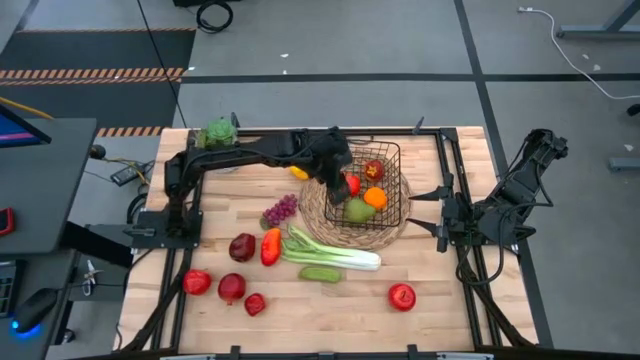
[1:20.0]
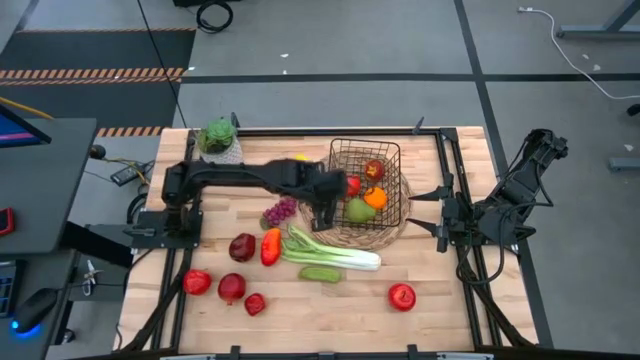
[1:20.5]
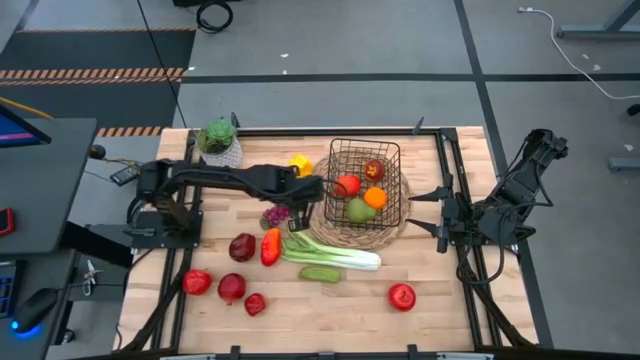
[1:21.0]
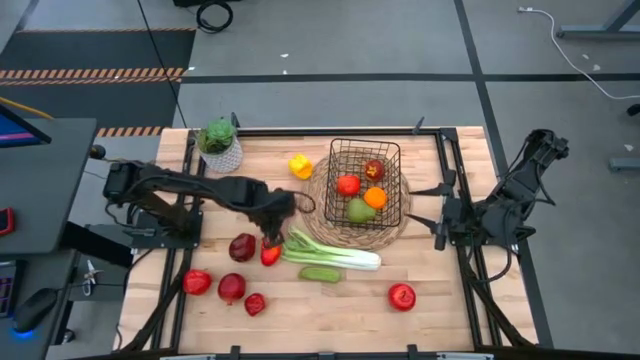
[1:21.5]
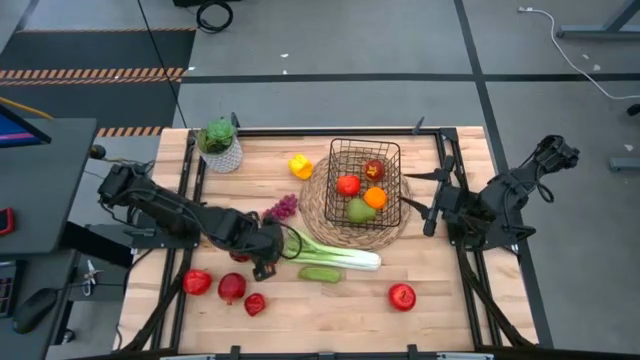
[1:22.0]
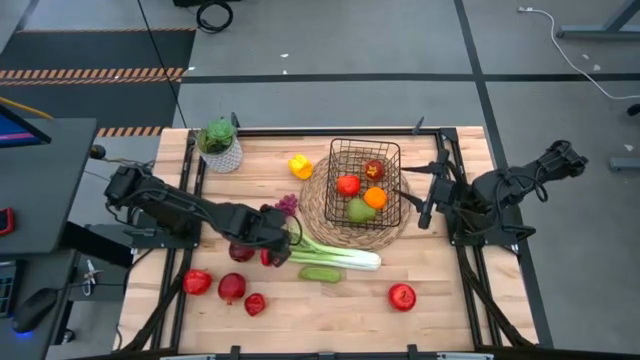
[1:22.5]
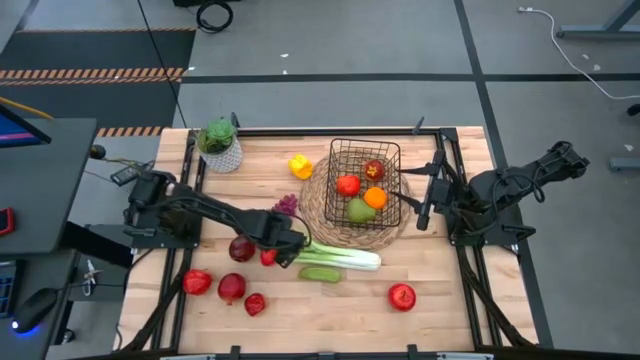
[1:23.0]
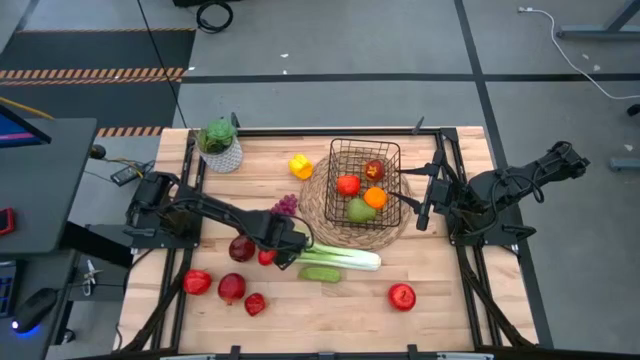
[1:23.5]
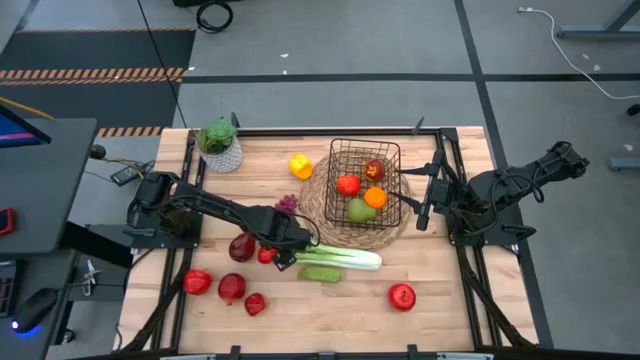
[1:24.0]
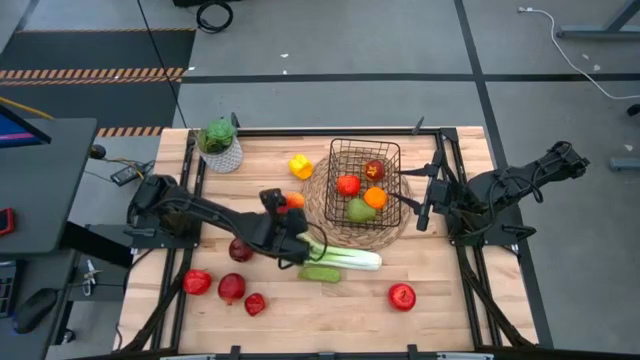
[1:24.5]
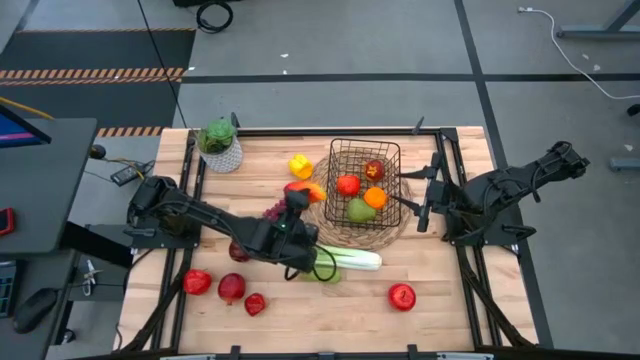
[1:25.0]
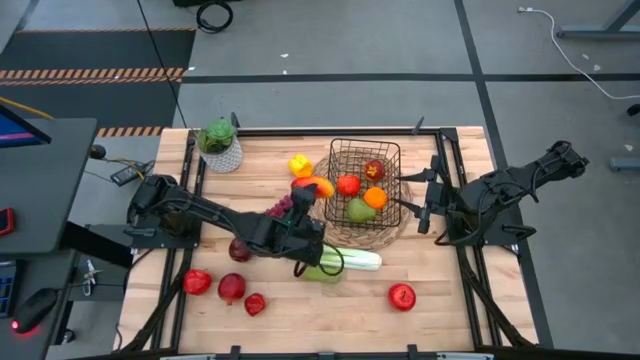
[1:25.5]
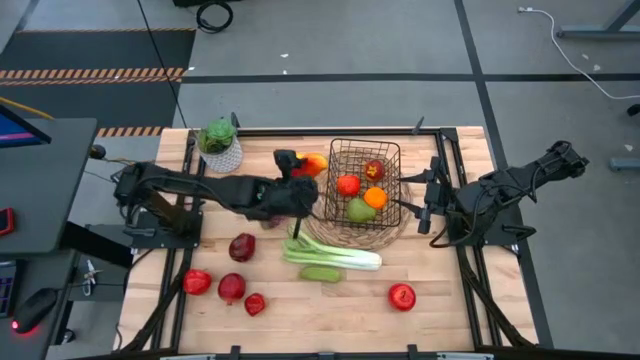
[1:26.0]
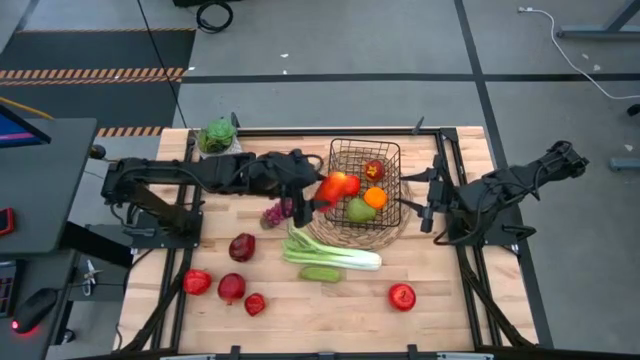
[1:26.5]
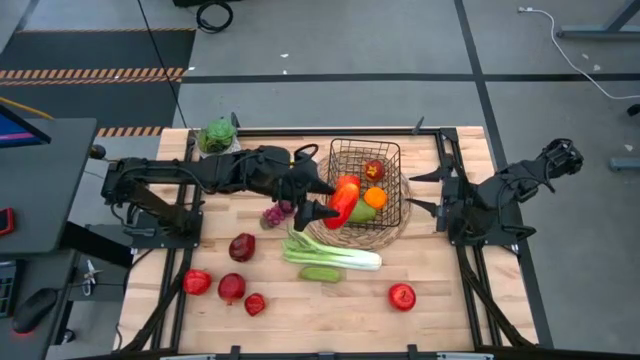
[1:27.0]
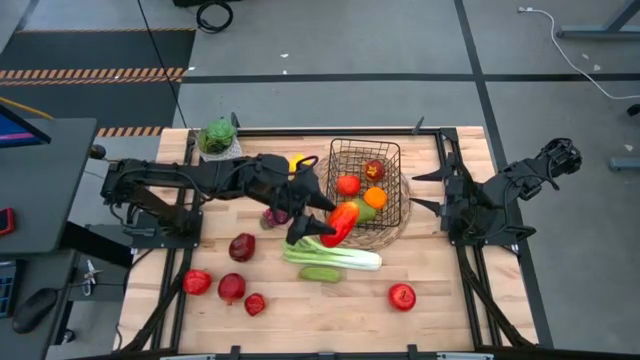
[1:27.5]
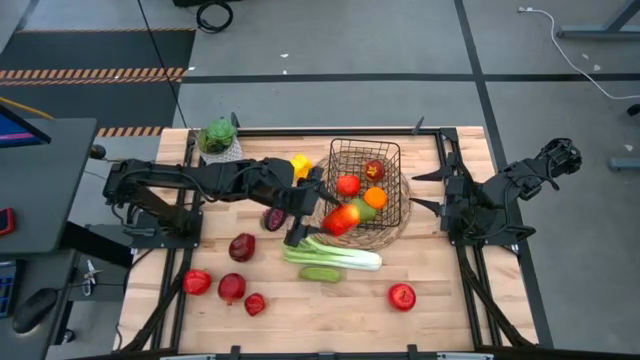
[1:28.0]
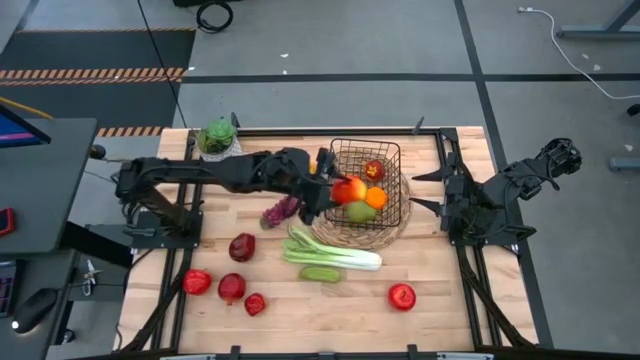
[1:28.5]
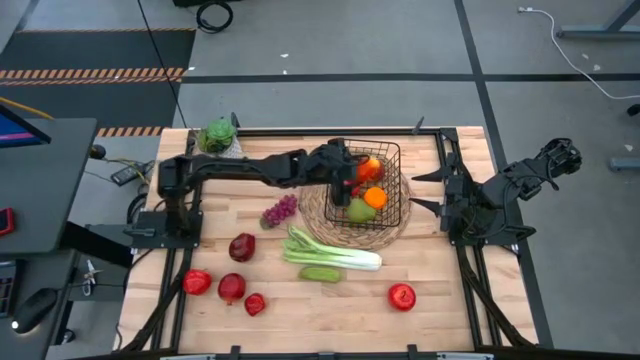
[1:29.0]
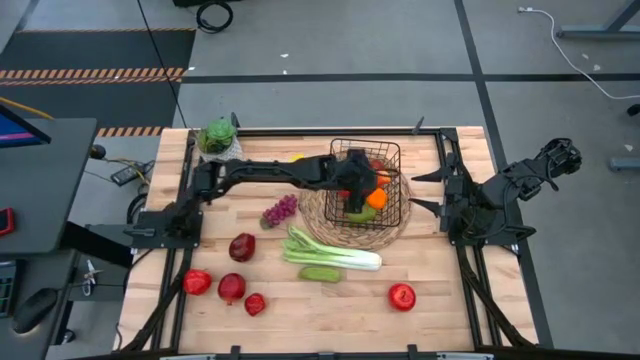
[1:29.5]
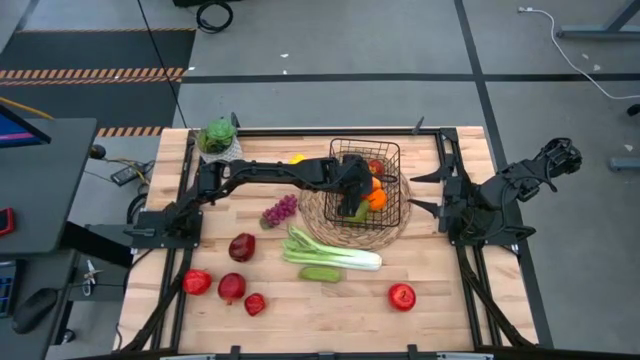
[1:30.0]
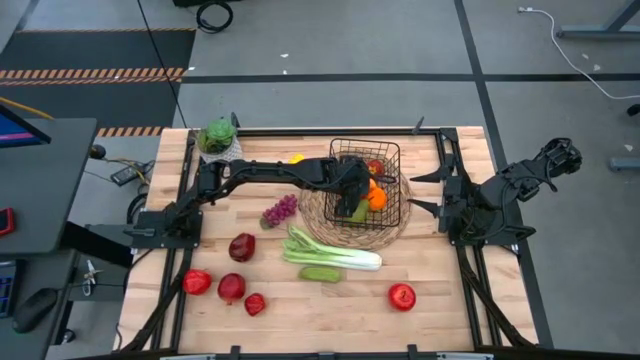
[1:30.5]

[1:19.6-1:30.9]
Task: Build produce basket
Put the mango into the wire basket

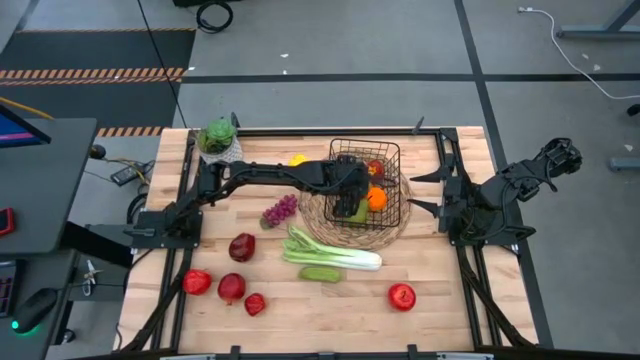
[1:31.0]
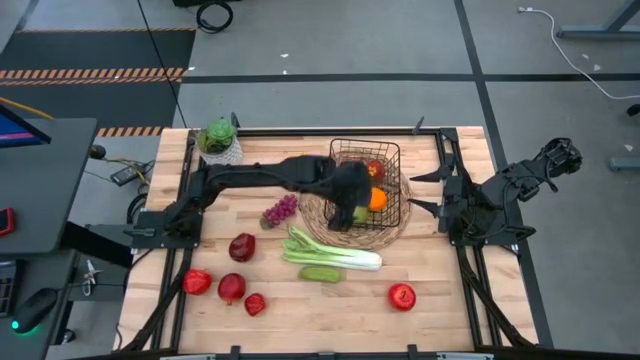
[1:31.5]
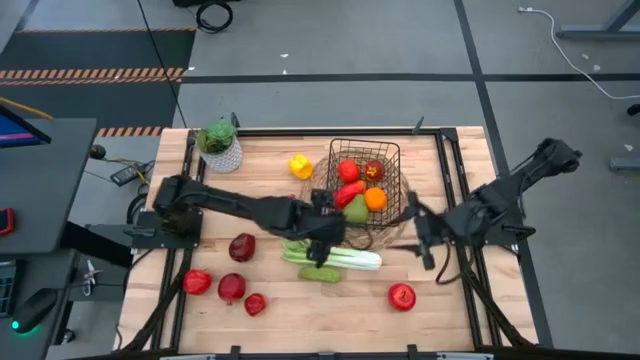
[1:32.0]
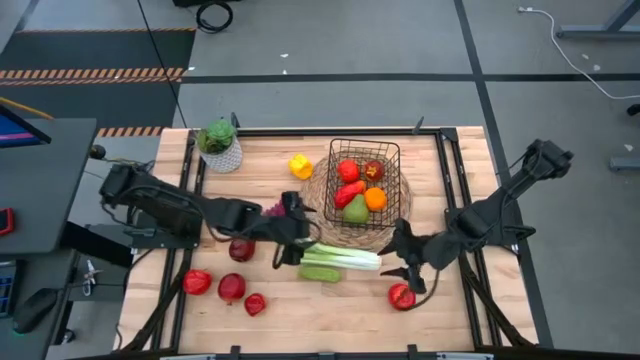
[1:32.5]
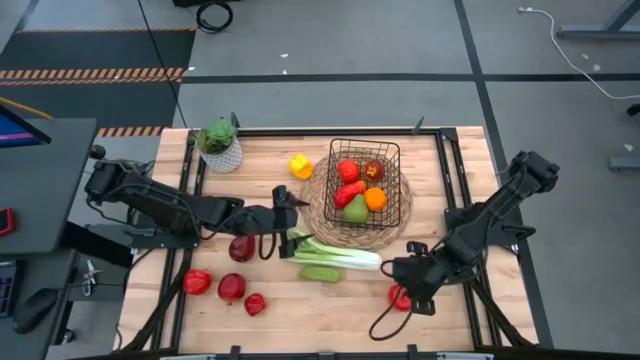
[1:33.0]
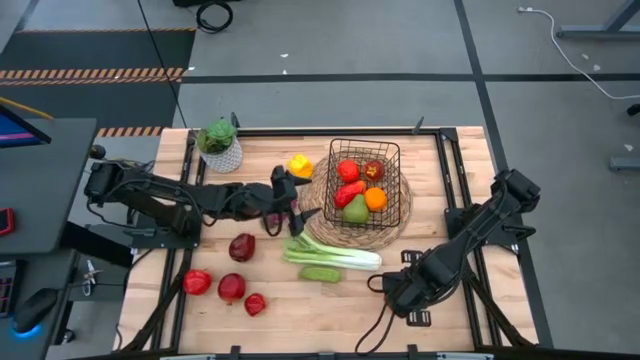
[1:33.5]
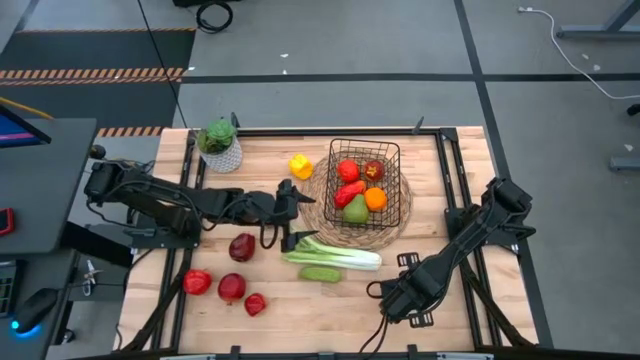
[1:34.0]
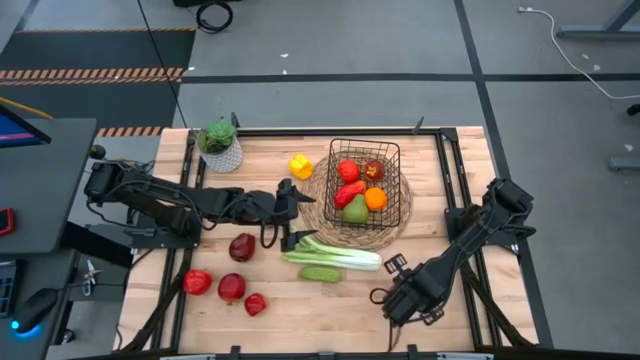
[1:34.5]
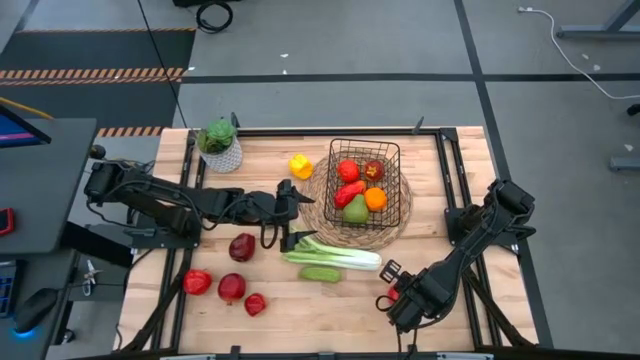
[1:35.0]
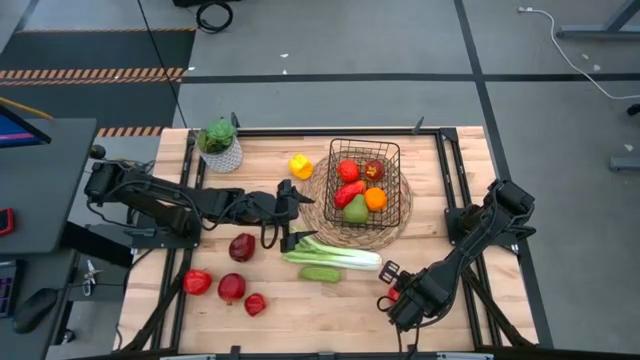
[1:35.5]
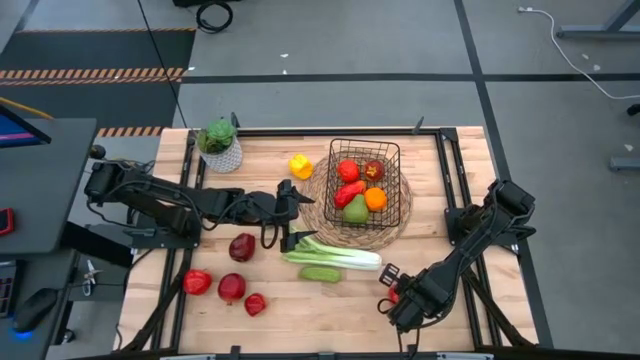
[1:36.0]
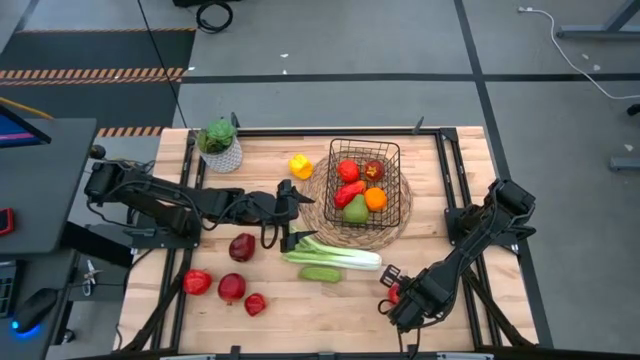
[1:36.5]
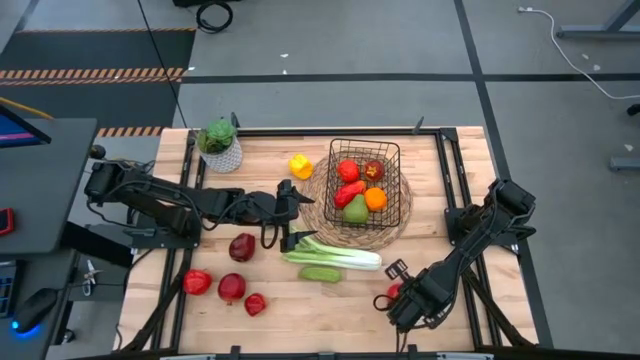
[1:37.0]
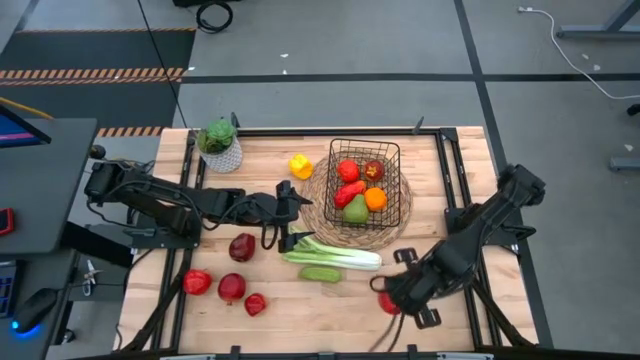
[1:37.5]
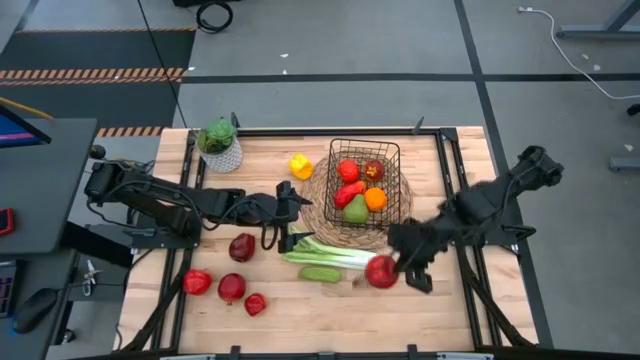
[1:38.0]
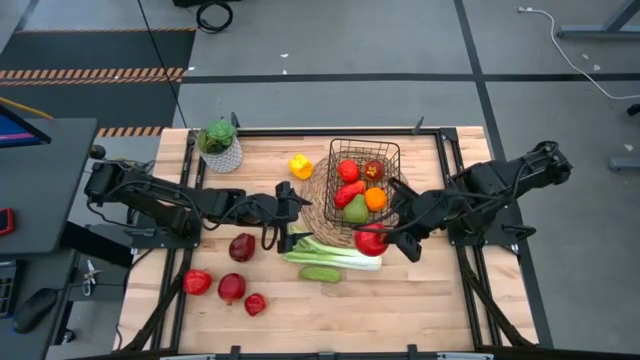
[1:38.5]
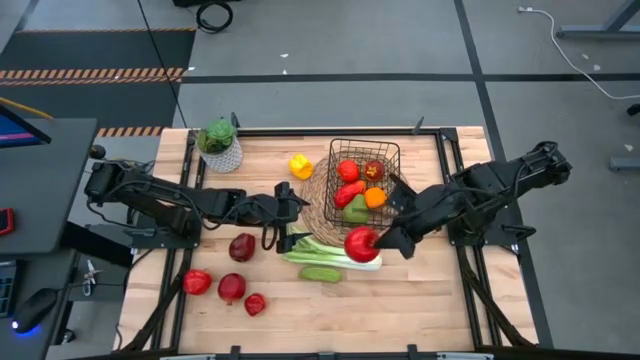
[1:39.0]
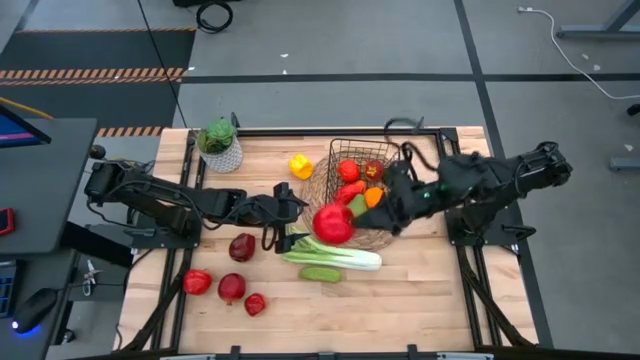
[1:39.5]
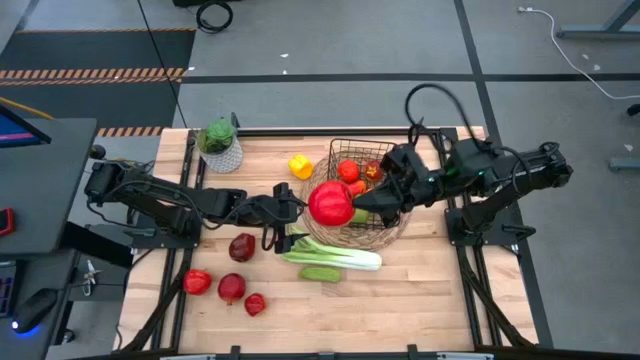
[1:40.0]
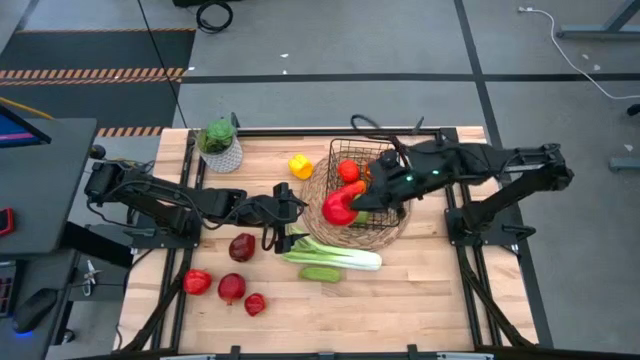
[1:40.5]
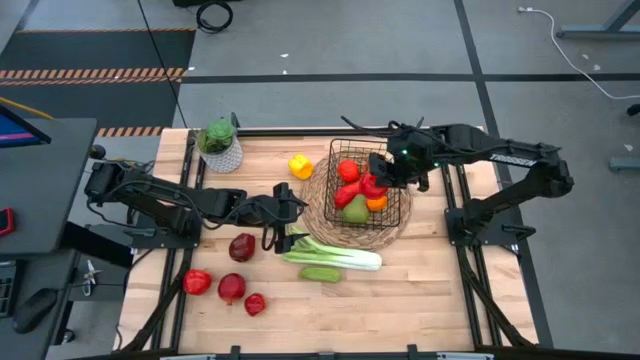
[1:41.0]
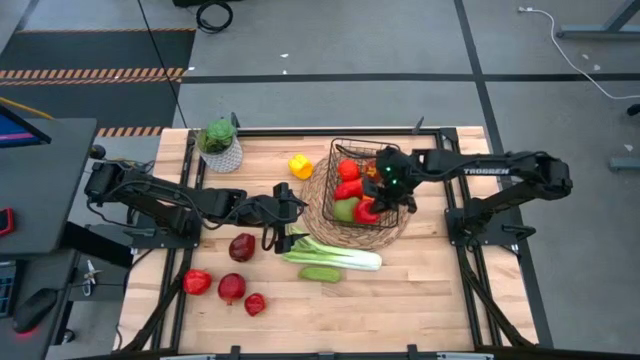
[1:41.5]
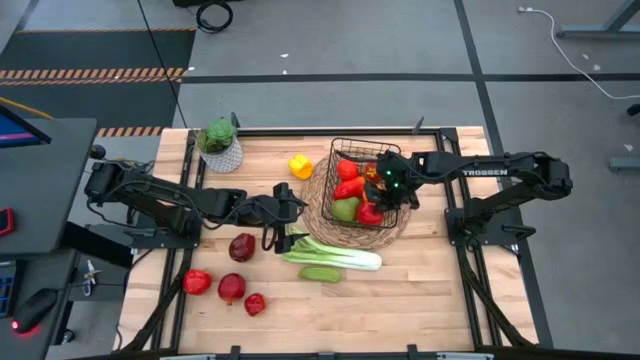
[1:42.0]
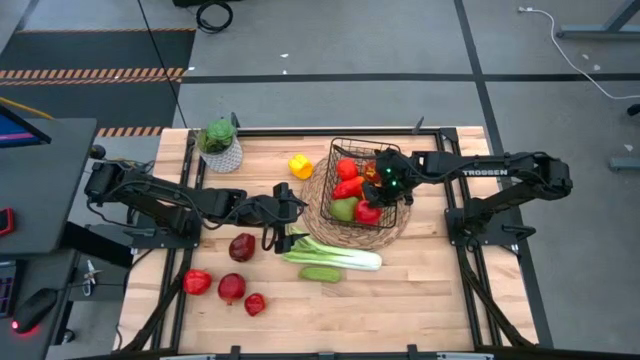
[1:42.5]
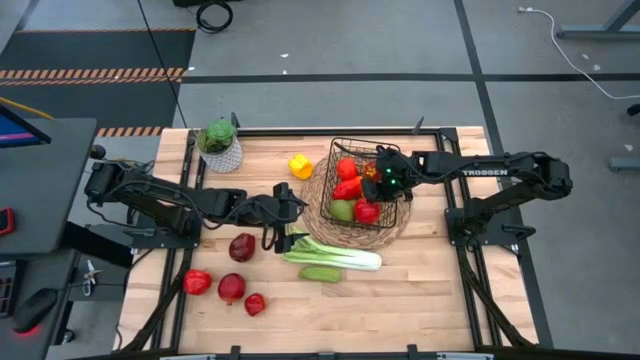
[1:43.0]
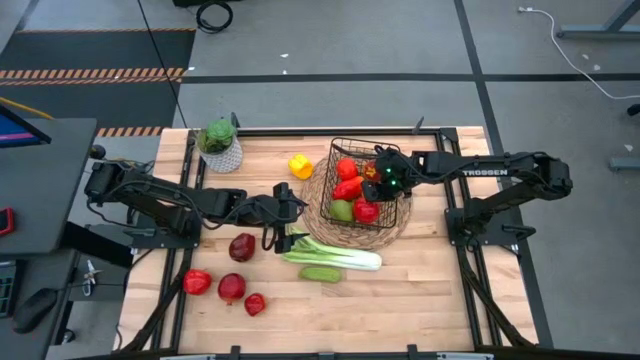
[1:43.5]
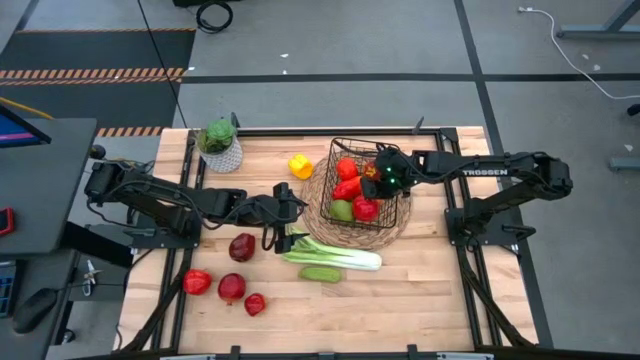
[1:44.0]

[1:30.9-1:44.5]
Put the apple into the wire basket
